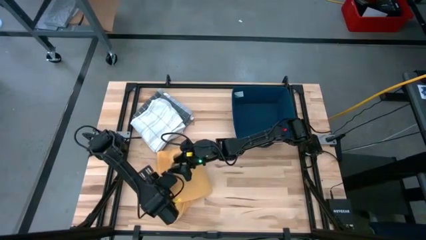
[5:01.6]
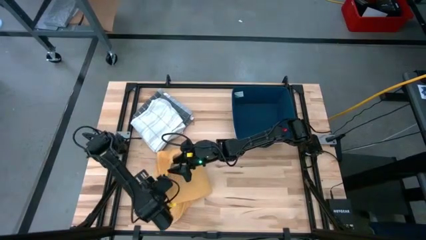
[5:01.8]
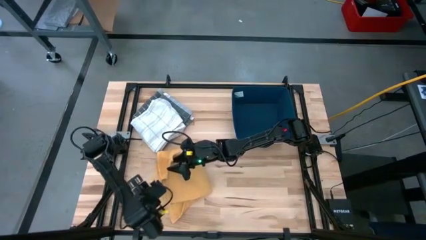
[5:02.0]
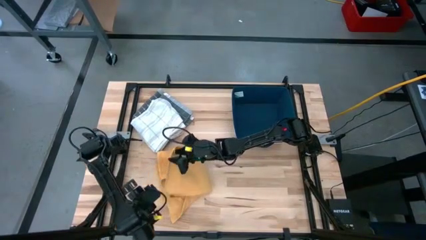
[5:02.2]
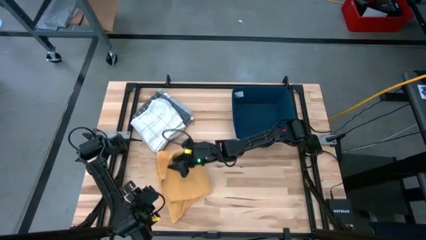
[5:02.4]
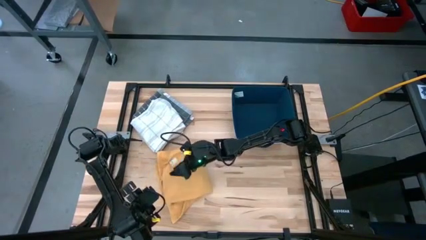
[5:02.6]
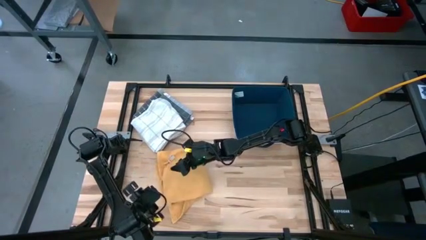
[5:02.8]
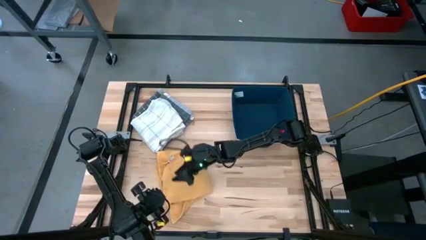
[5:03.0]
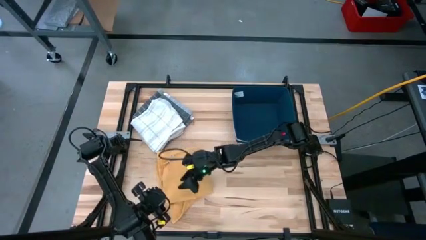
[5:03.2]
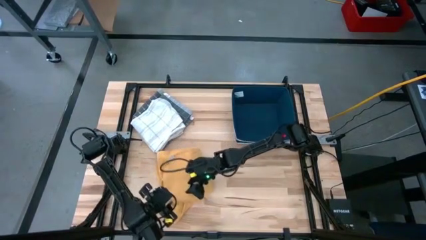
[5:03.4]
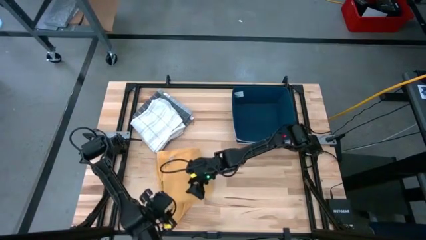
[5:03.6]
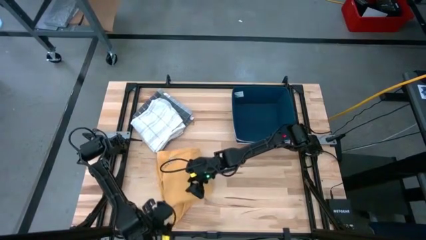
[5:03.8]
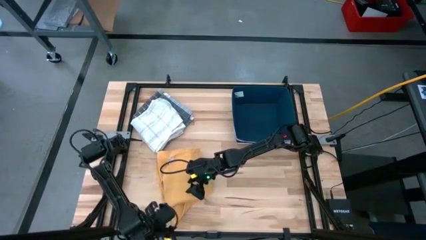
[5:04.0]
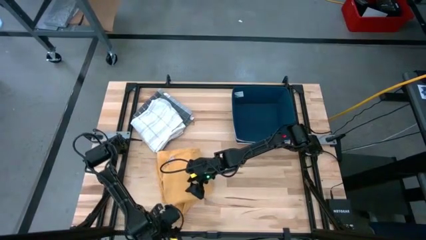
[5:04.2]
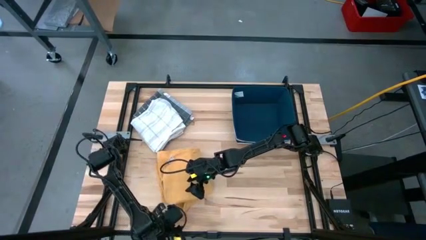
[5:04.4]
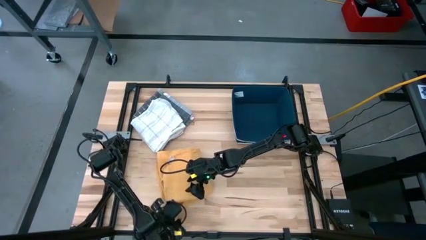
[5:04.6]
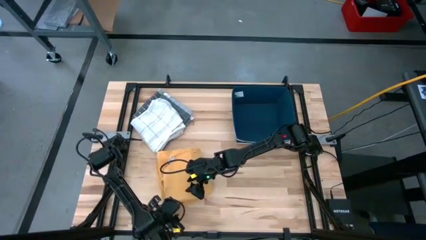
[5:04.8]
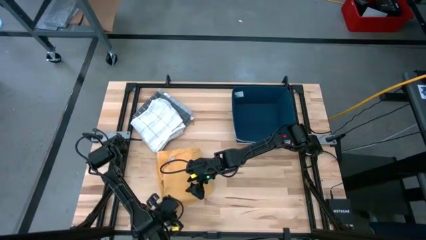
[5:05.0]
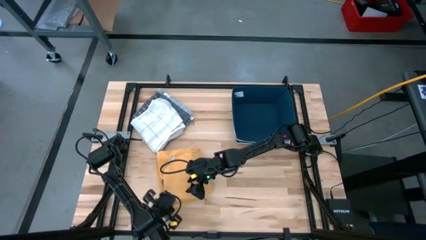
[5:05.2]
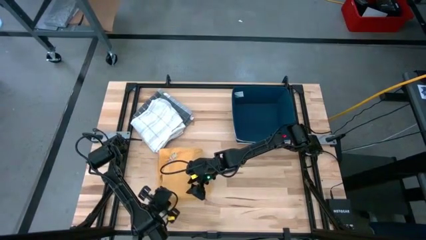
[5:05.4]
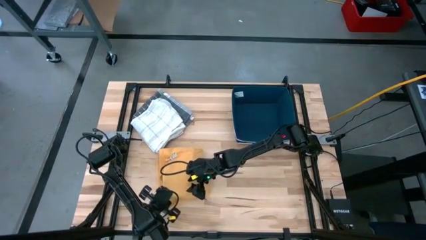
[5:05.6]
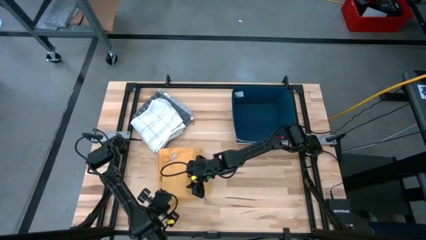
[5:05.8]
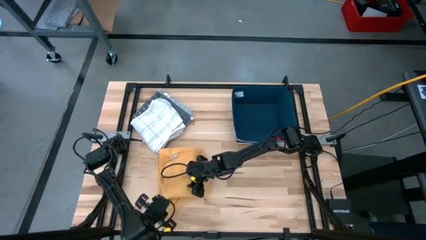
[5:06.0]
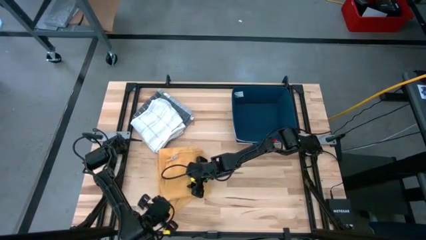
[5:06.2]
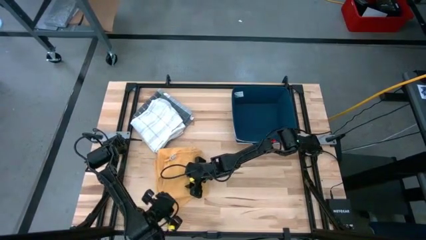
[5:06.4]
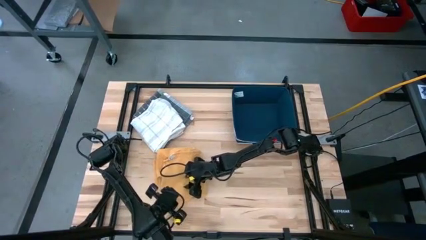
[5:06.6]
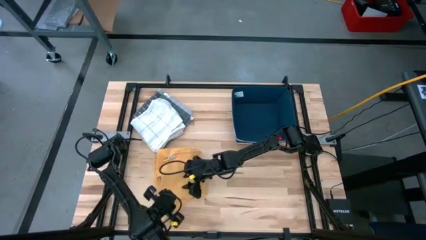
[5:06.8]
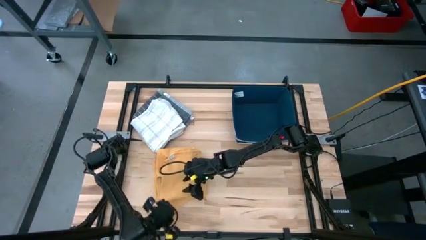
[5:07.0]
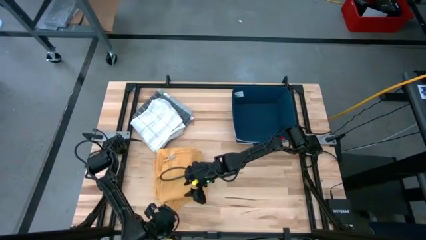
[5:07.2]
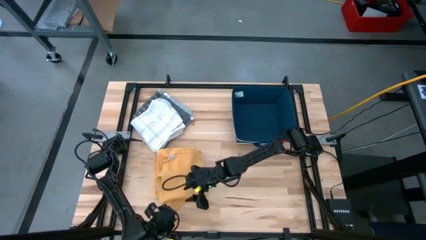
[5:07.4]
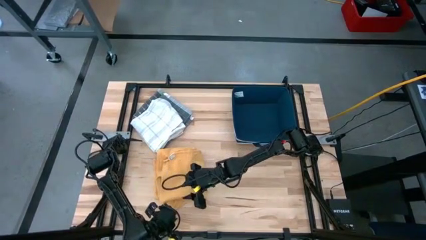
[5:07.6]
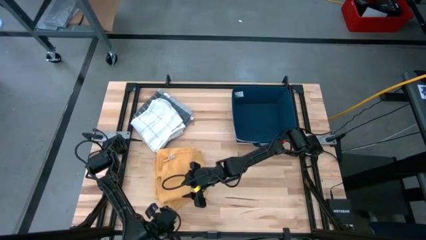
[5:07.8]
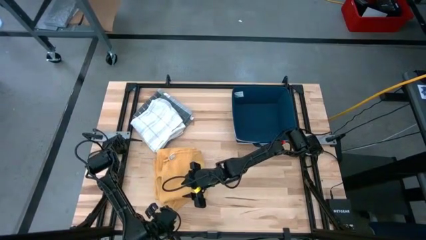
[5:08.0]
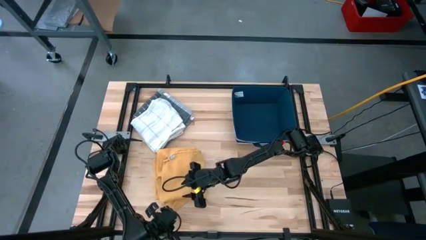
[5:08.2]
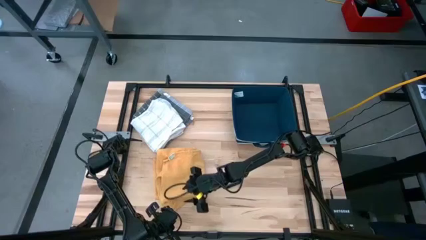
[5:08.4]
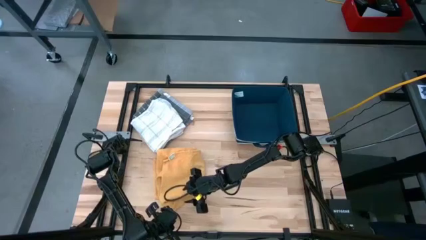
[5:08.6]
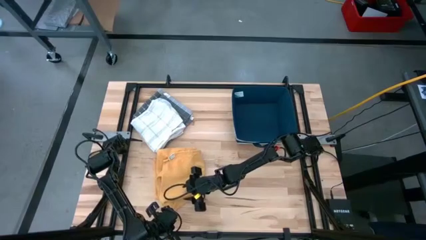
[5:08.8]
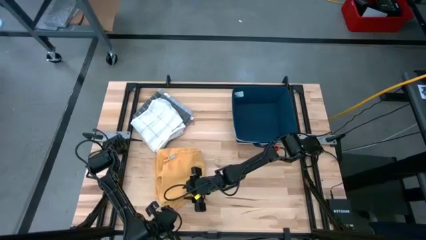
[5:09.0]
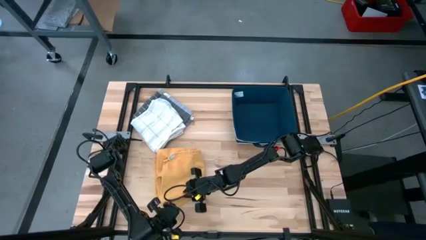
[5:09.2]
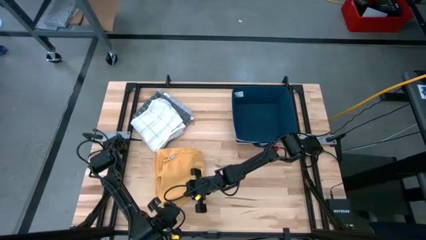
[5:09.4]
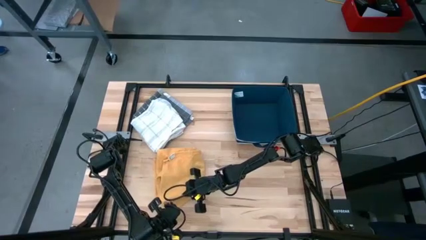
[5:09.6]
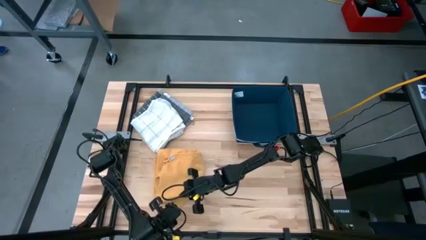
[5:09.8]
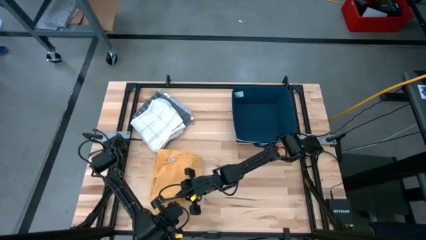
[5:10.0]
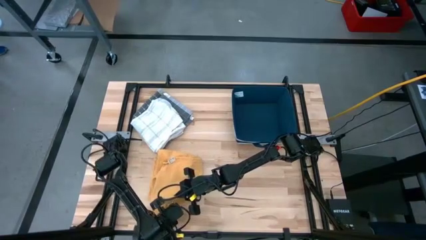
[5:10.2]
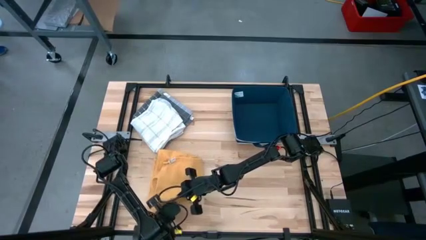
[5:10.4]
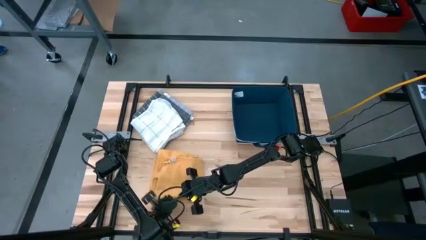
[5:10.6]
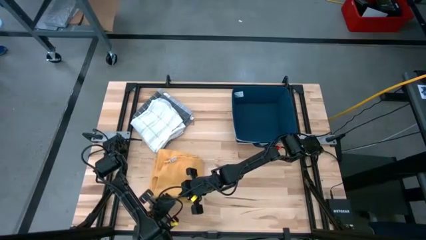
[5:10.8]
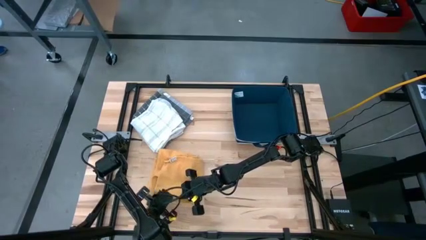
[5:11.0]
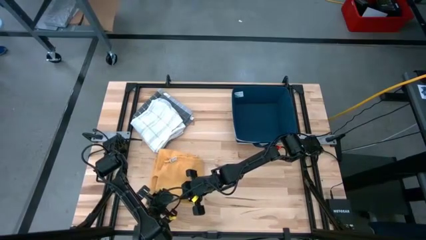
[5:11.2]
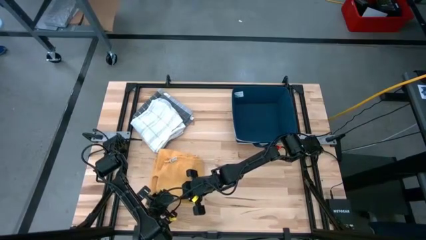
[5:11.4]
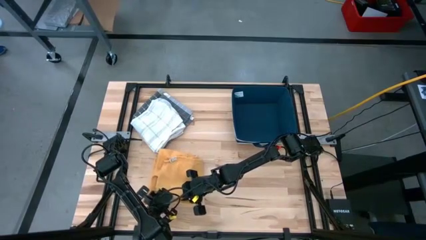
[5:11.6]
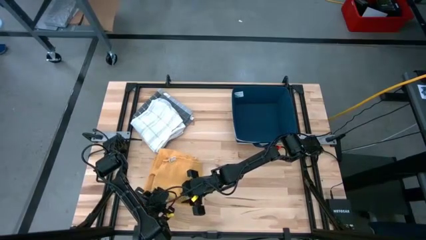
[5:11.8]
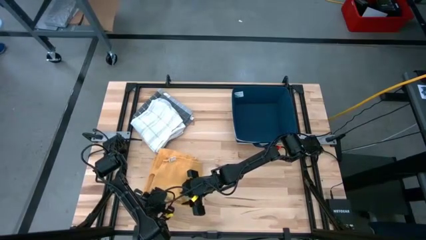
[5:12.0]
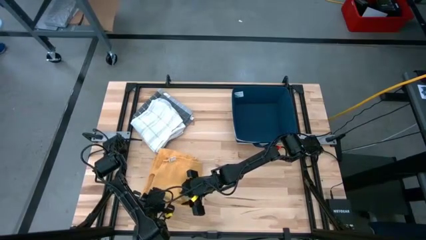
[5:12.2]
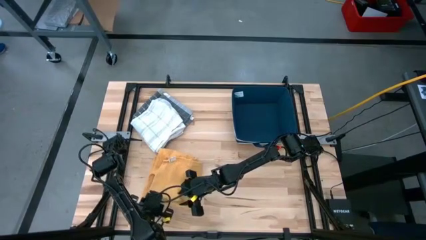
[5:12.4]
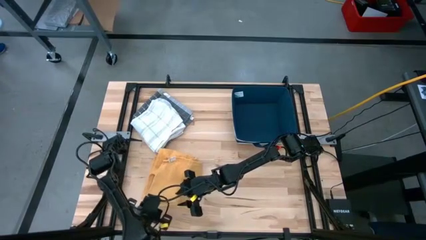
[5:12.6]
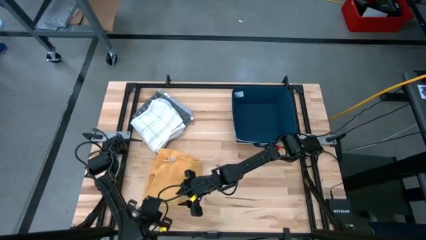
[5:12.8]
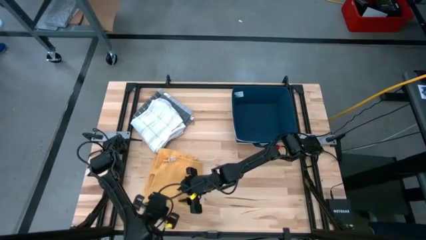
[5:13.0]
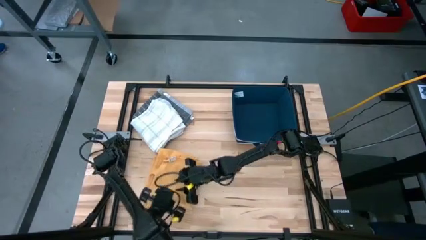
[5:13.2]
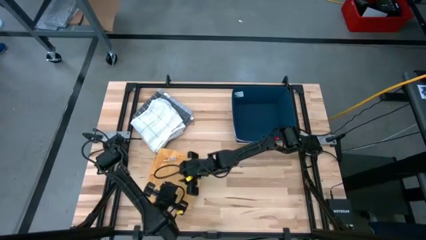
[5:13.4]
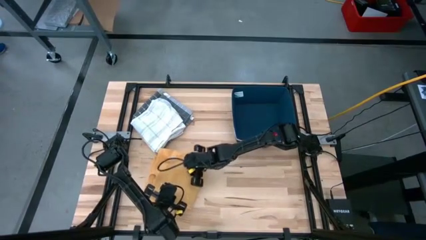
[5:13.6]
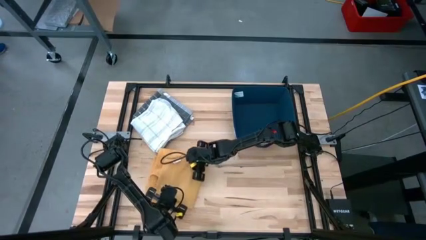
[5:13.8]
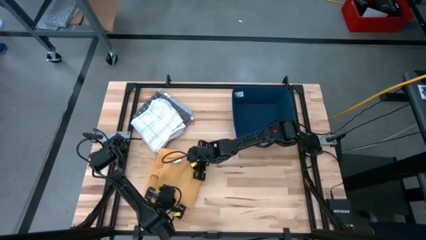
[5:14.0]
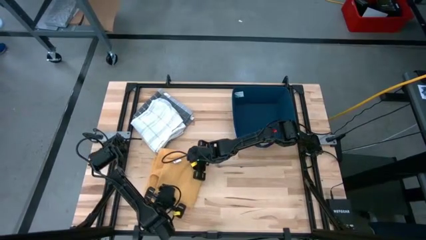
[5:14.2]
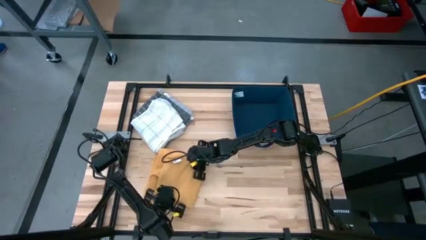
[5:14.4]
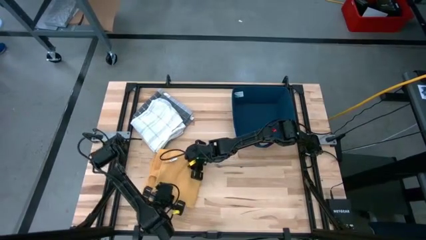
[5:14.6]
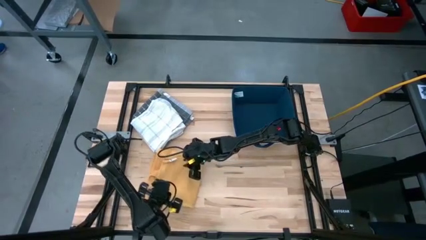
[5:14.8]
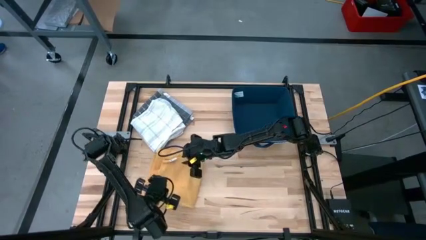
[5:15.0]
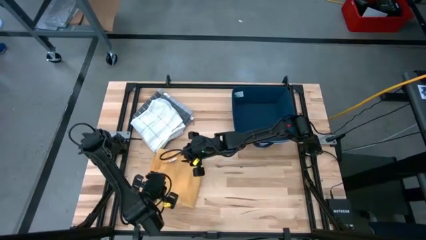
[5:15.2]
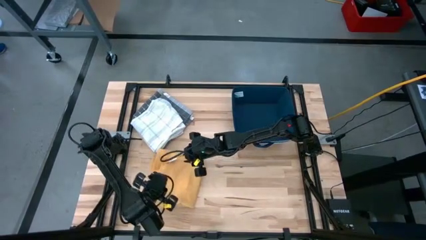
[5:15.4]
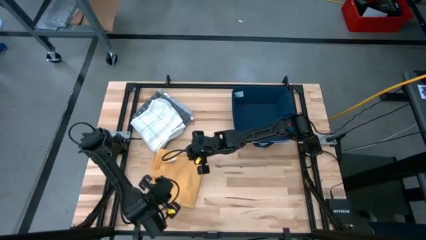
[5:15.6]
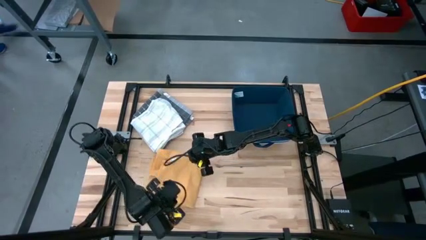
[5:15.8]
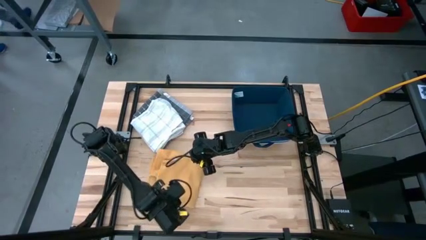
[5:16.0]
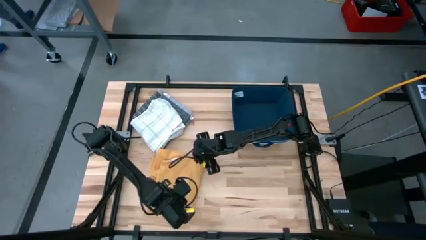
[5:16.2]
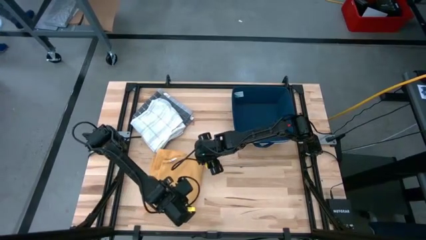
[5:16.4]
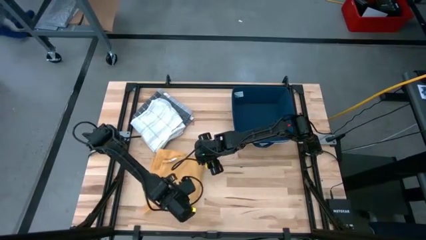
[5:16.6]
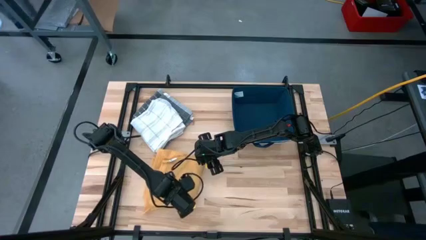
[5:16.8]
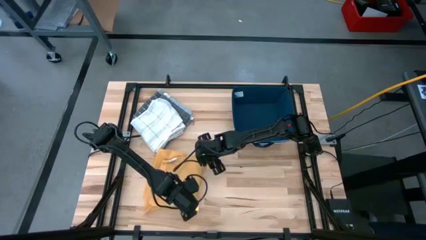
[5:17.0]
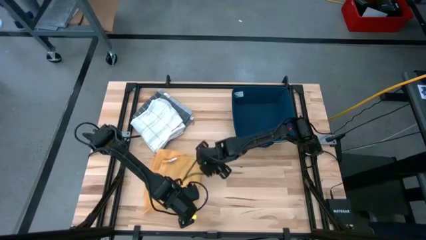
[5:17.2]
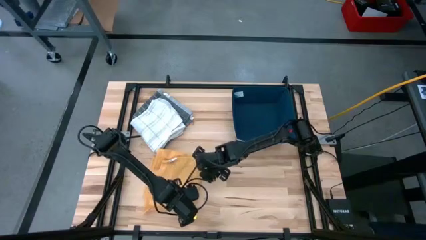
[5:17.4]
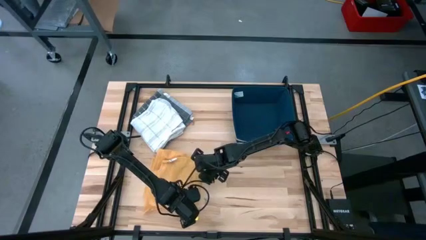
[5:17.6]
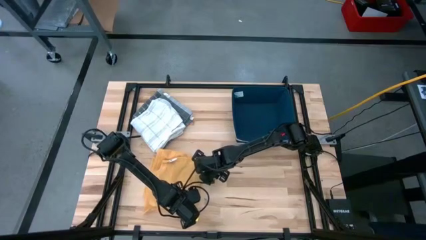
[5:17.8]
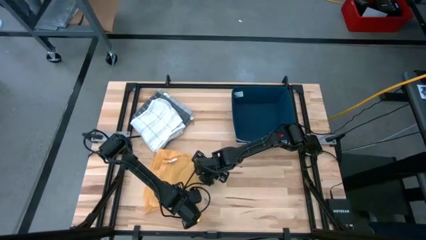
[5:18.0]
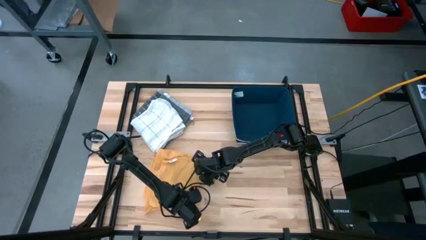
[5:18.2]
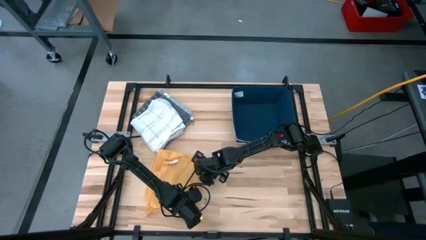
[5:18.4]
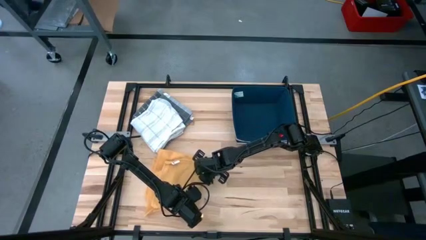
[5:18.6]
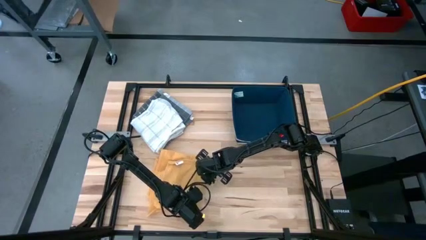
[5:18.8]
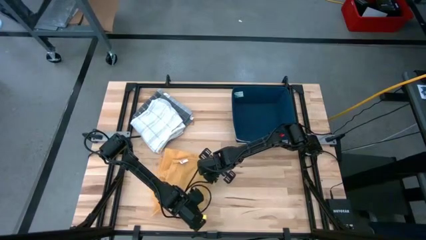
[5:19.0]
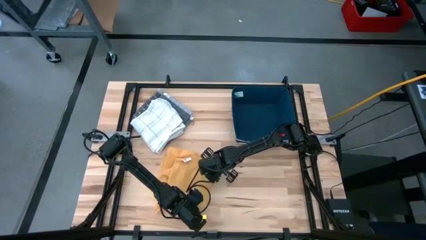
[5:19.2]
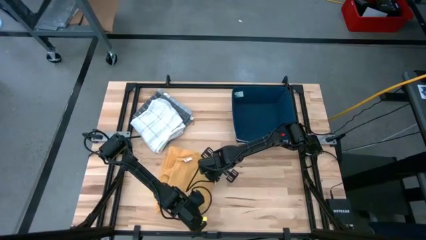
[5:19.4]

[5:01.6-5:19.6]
Task: Fold towel
Fold the yellow towel
